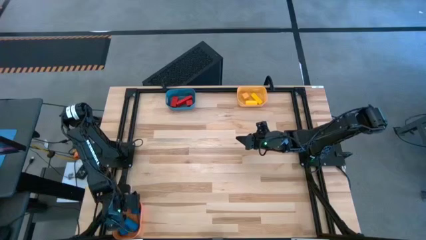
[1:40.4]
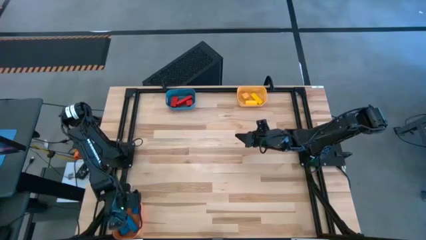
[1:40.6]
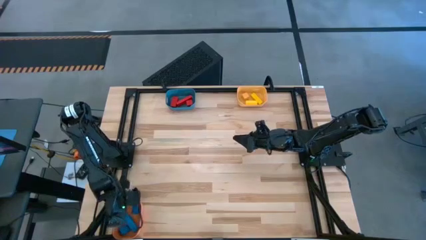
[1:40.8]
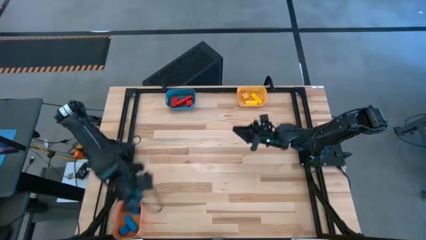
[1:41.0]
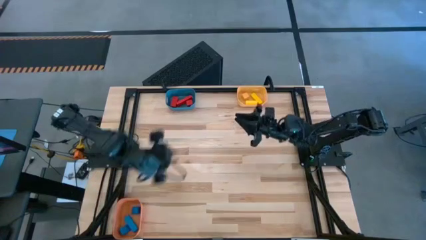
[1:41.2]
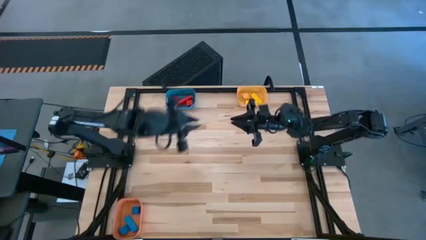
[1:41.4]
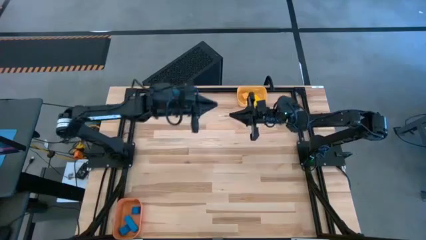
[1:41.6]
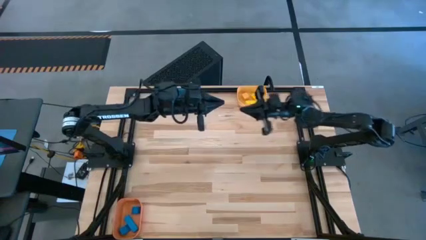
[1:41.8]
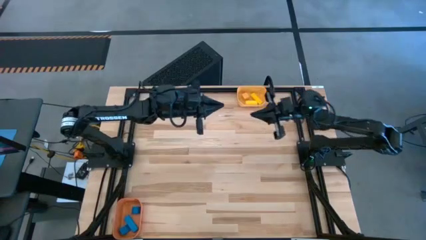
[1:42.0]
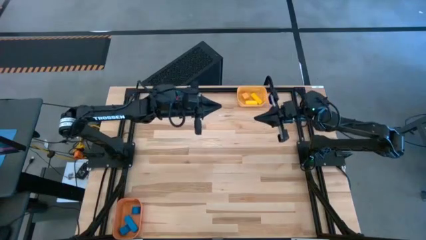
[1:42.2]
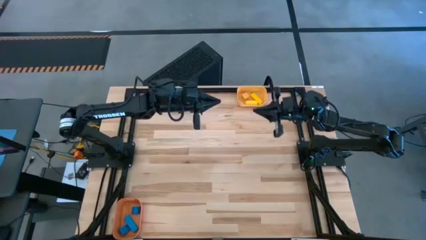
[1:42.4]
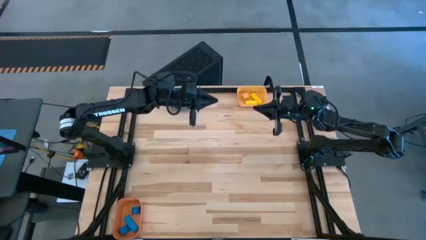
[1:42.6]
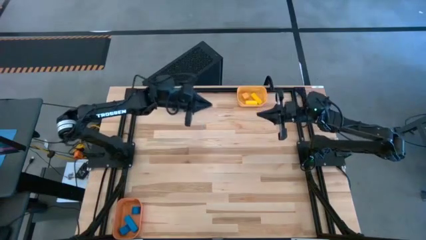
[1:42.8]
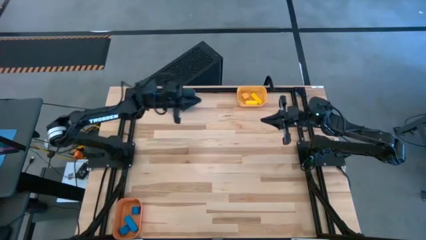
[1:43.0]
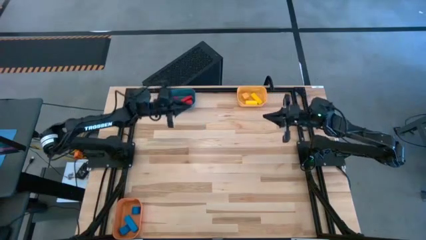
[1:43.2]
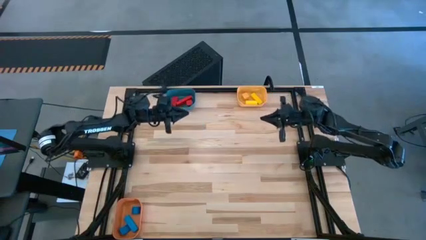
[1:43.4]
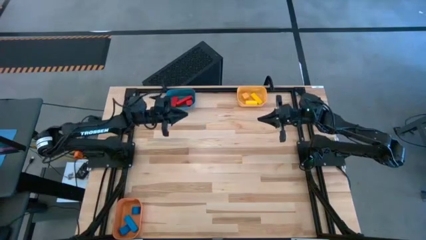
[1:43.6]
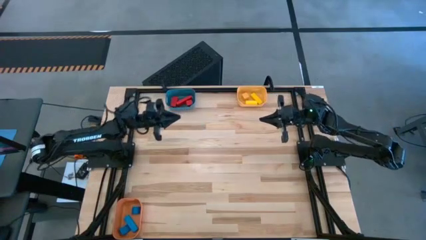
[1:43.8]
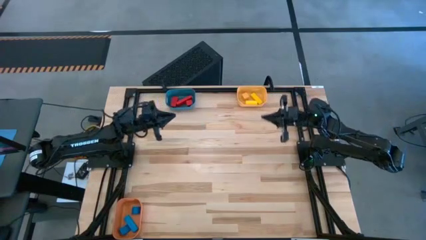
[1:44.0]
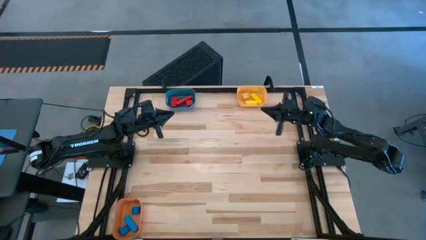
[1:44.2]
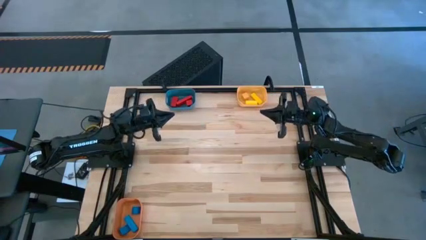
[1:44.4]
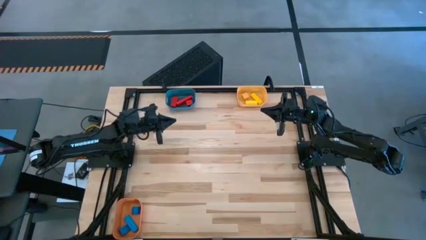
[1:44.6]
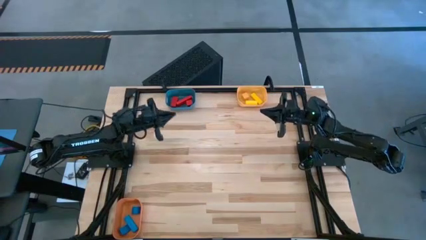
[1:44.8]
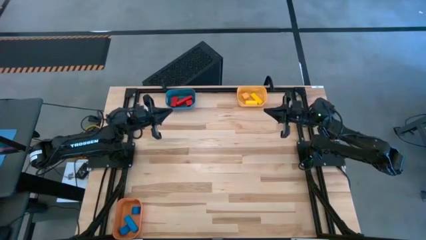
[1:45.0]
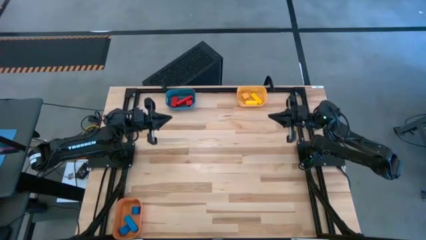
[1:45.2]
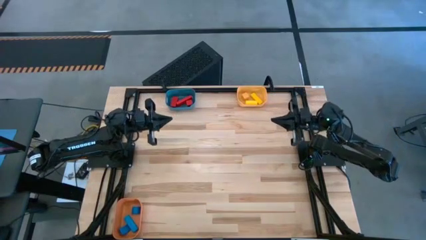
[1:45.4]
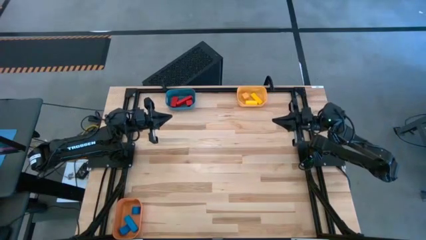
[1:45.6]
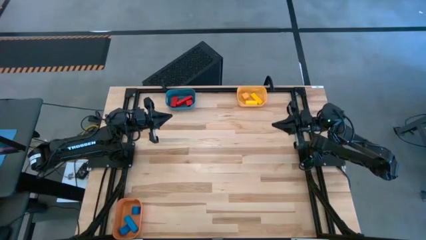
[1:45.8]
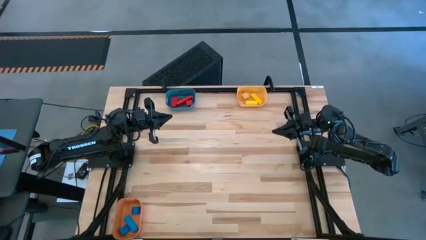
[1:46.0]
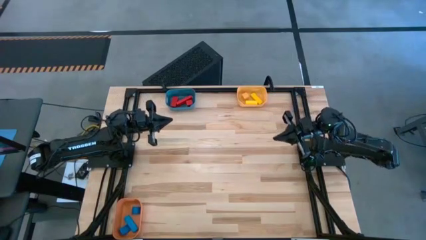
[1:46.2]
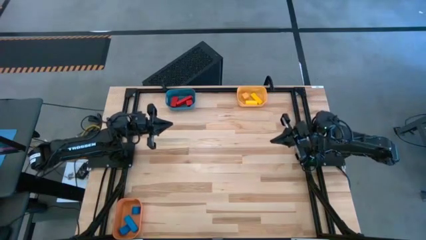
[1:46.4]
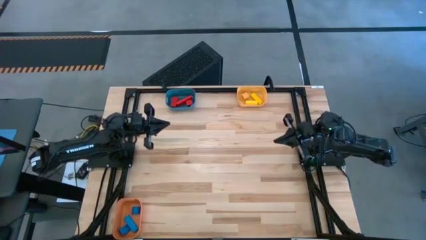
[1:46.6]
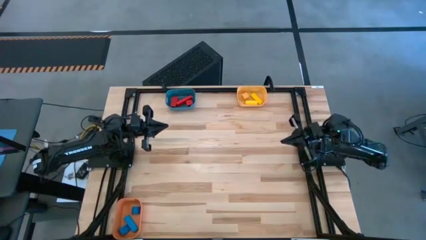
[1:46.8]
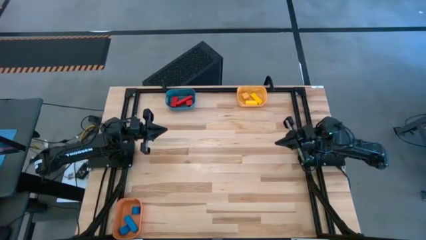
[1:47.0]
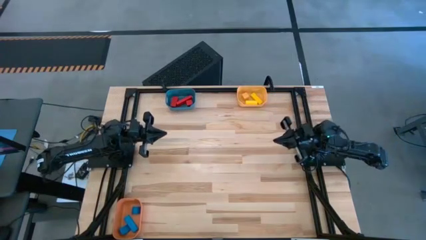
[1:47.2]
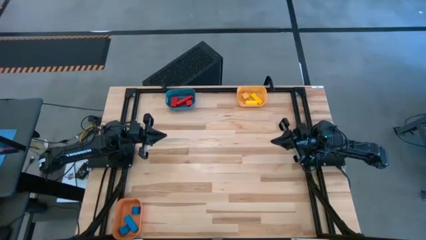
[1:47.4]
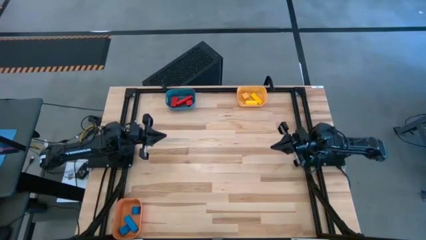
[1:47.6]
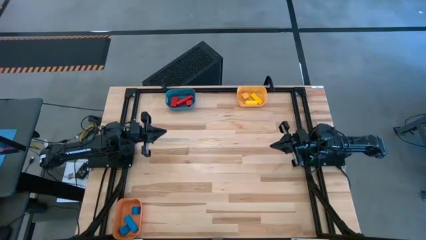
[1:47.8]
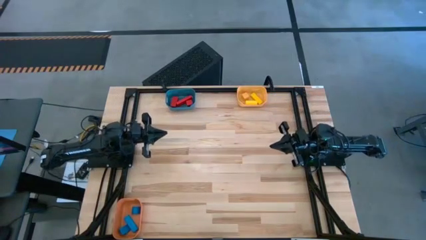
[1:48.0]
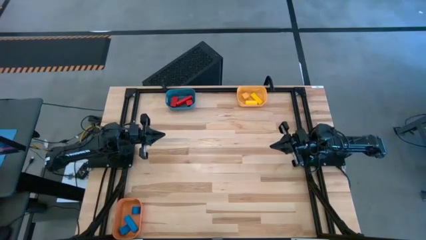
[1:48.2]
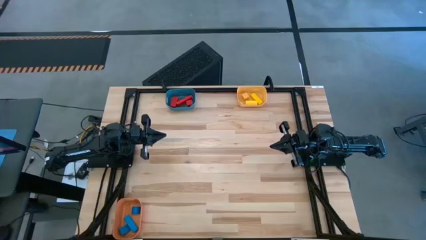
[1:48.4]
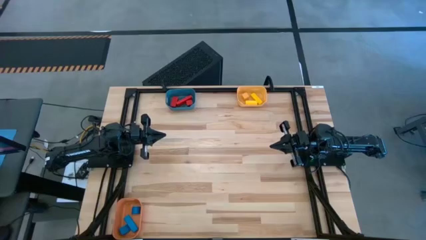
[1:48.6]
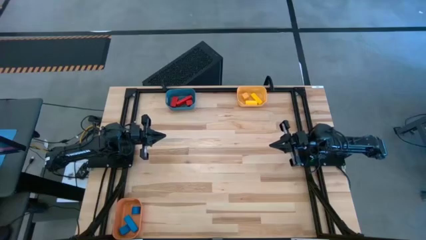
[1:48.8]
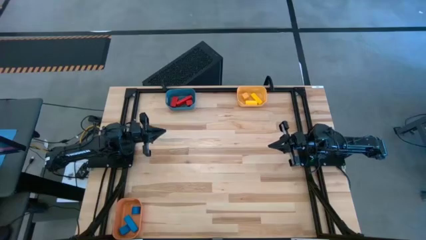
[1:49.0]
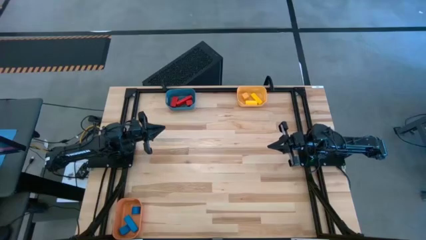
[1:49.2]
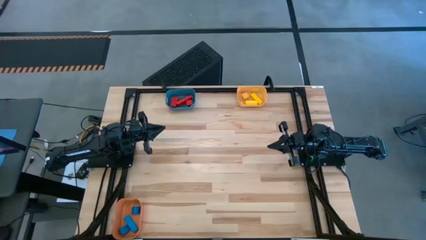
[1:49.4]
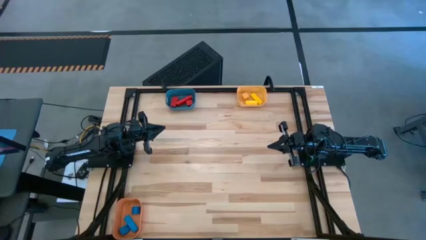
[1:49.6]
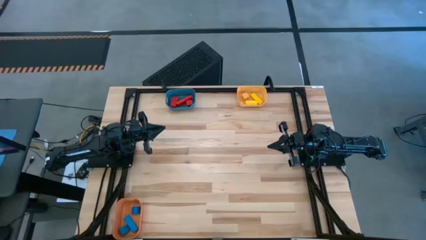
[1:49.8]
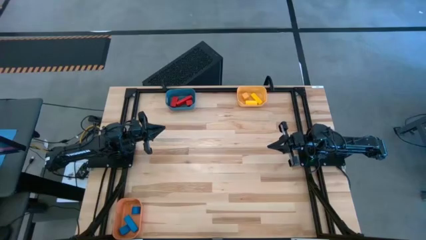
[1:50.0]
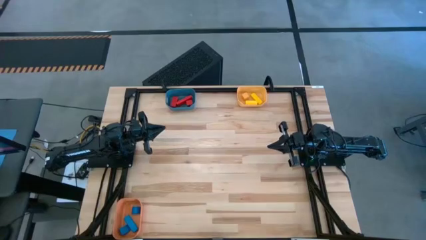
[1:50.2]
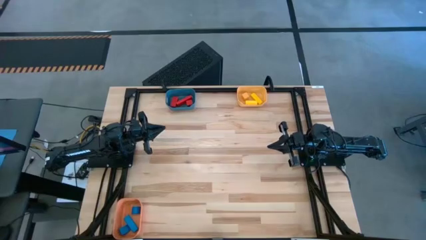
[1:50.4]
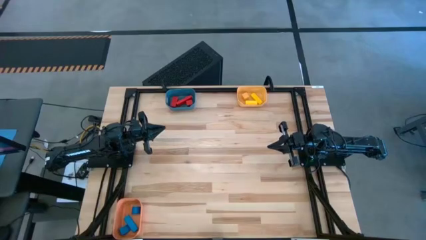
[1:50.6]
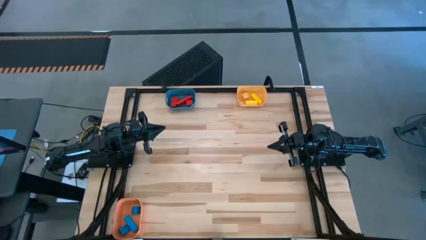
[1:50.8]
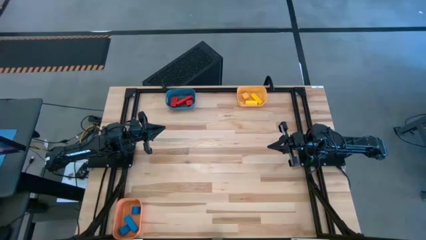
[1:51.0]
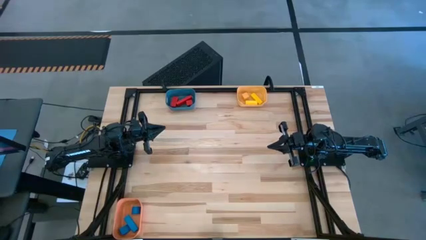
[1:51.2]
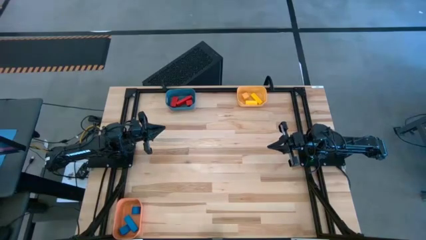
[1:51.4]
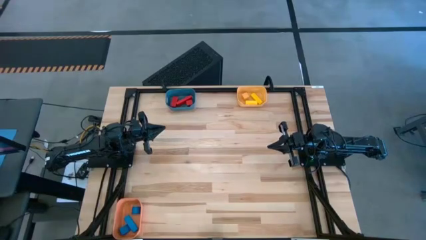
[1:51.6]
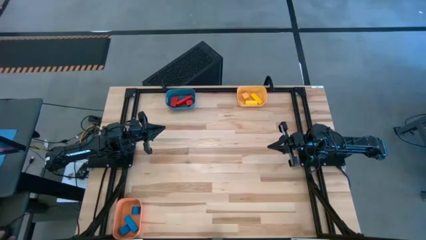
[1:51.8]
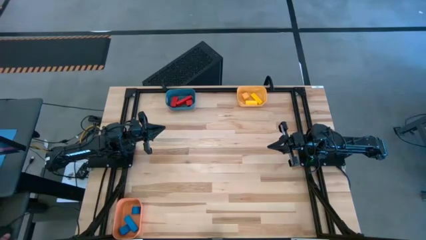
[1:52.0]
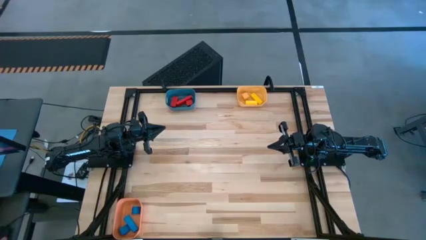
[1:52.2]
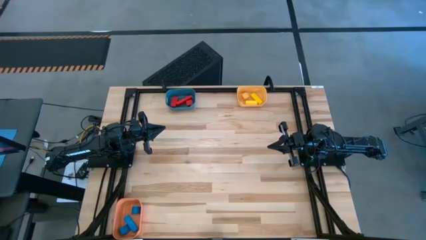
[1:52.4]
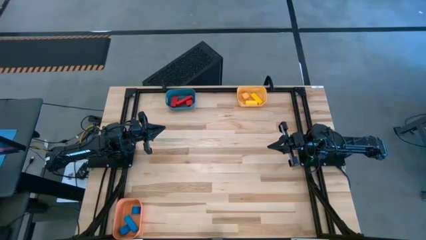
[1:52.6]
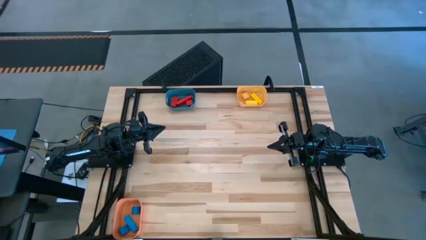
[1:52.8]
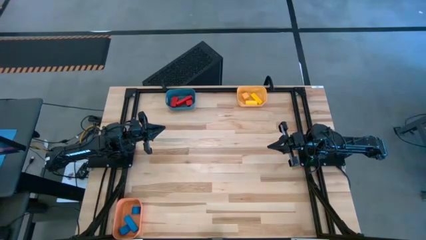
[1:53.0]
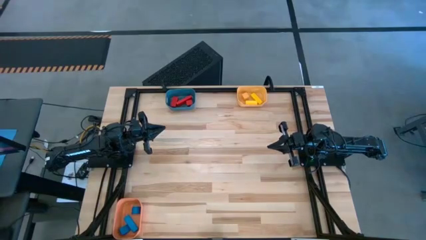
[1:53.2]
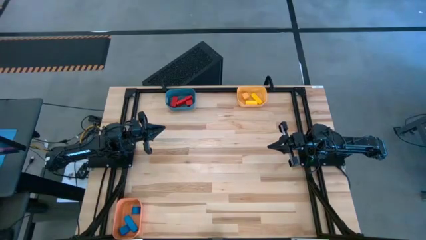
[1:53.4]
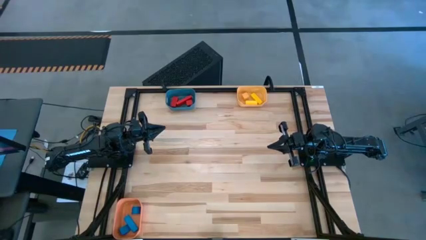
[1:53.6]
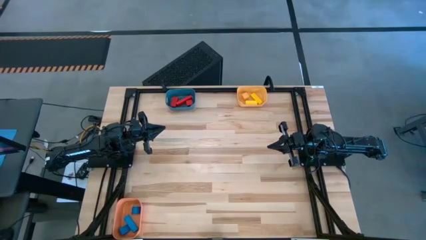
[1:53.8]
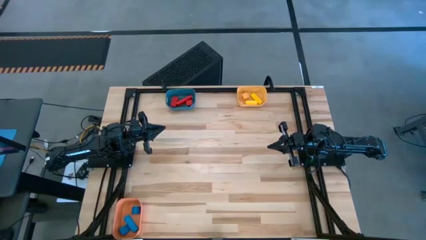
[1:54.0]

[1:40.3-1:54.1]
Task: Sort & place blocks by color
Return to Home Position

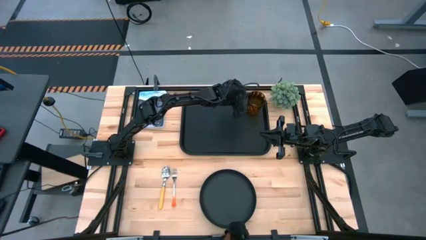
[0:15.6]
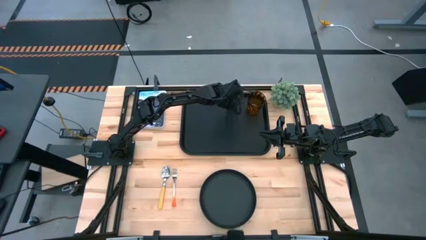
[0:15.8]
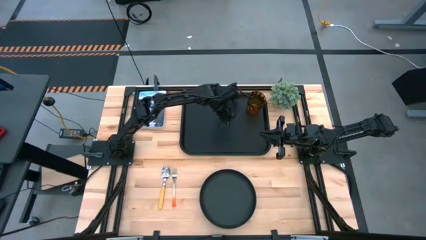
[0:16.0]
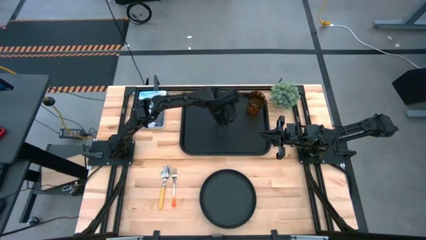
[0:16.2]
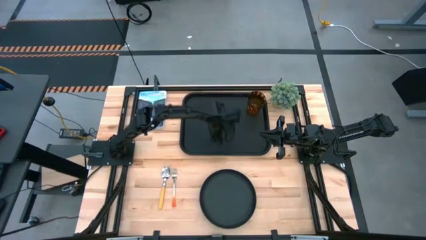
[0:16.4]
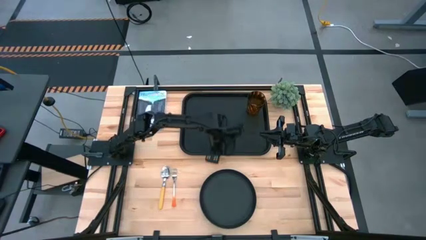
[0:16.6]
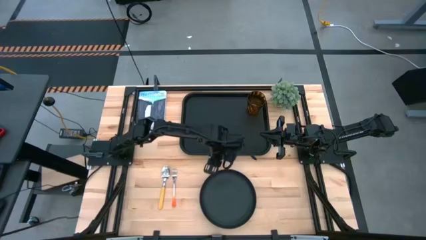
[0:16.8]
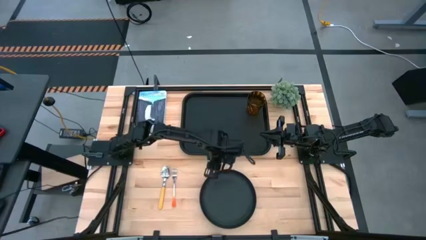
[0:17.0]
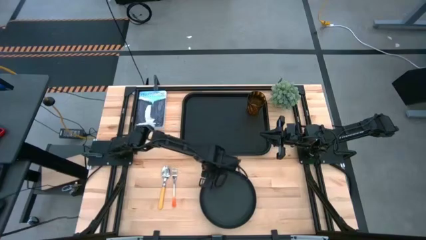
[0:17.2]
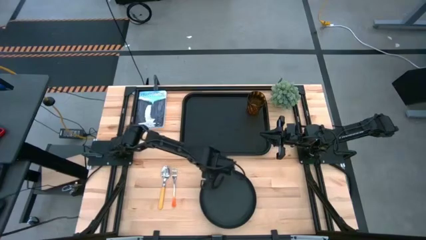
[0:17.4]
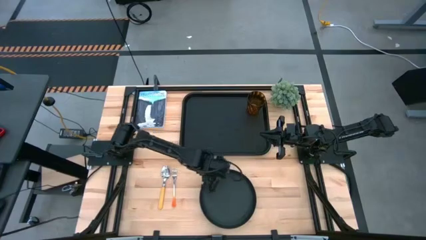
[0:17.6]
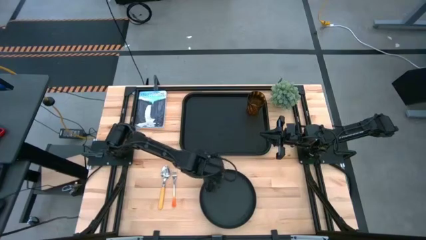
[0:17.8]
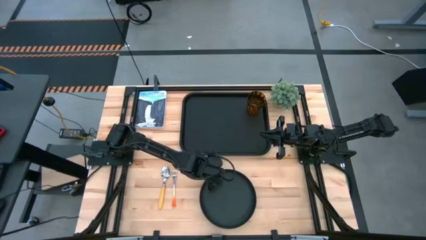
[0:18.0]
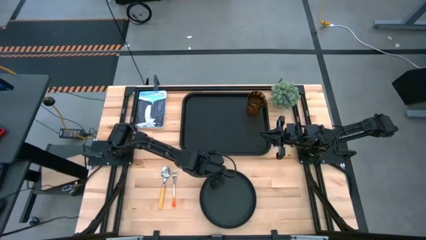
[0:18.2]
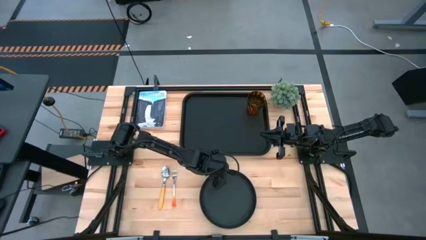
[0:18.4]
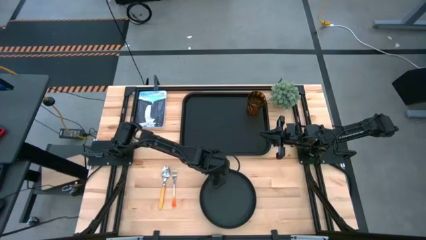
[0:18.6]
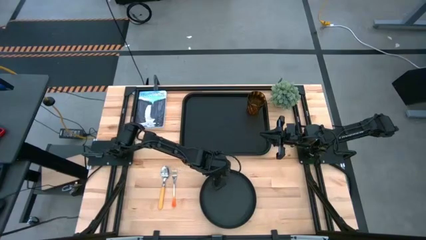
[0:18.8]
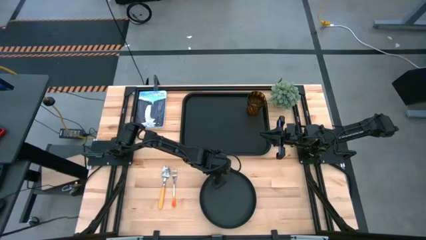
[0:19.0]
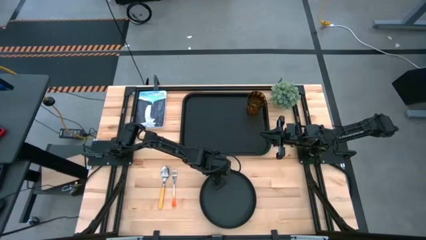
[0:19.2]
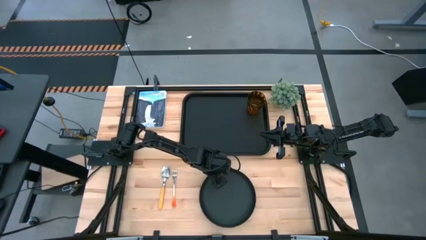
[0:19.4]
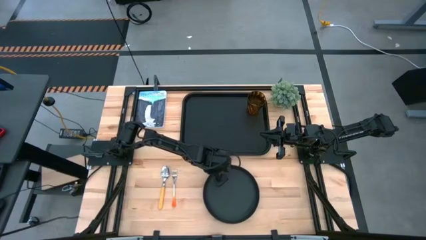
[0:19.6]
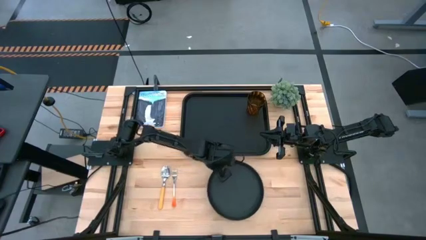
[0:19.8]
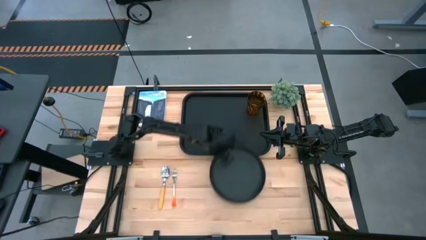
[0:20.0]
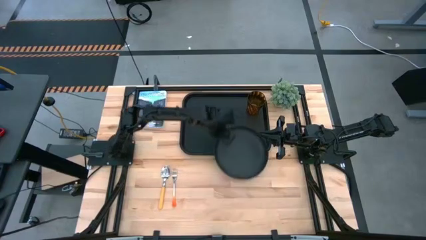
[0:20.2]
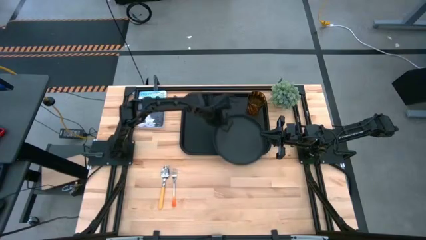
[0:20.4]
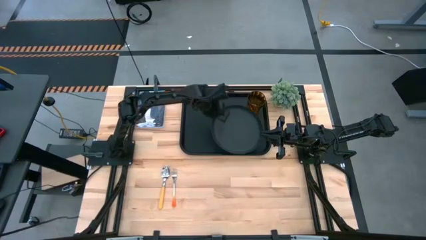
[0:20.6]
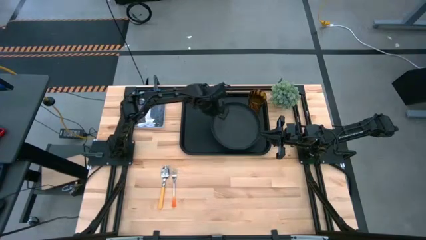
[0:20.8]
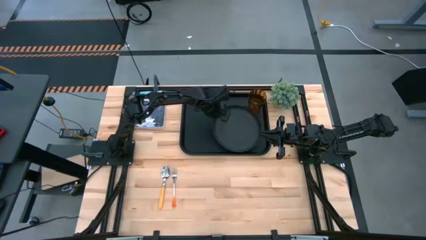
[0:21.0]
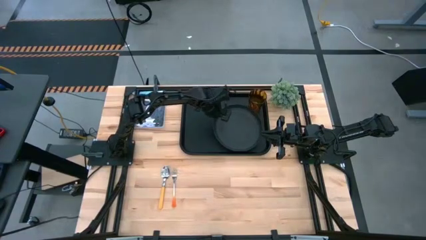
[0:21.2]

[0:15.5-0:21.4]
Task: Pick and place plate/cup/fork/spoon on tray
Put the black plate on the black serving tray to the bottom of the brown glass
